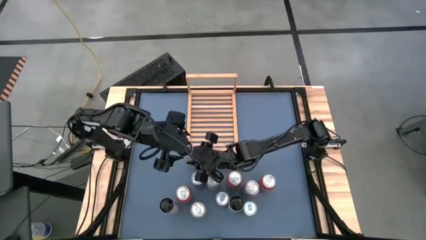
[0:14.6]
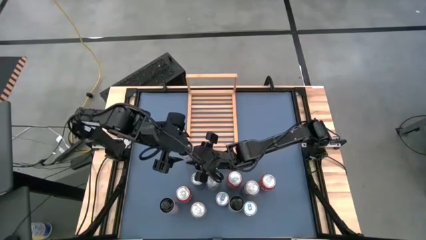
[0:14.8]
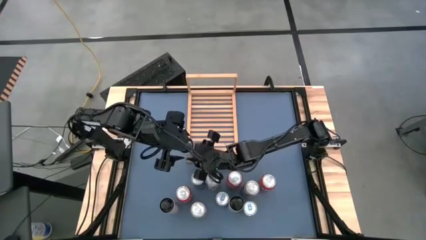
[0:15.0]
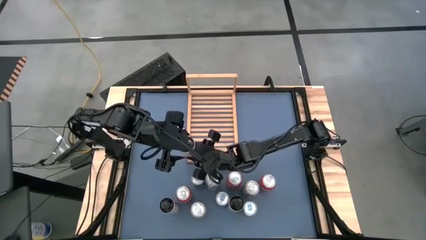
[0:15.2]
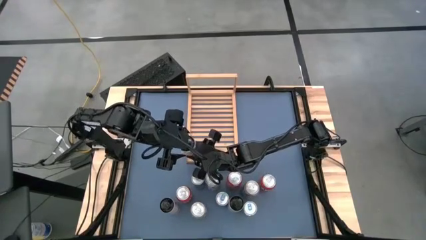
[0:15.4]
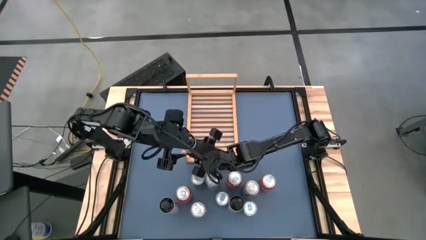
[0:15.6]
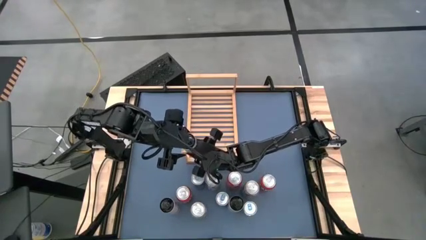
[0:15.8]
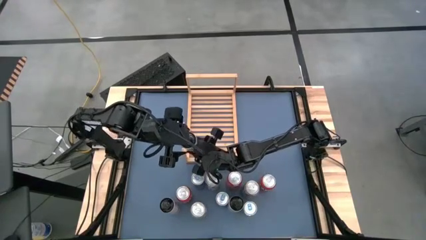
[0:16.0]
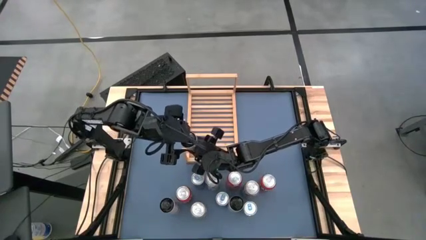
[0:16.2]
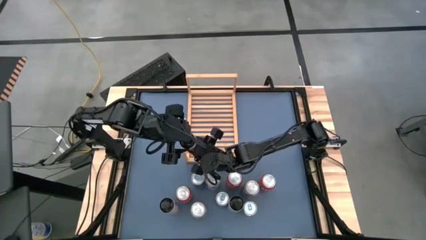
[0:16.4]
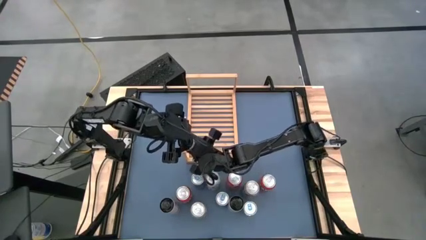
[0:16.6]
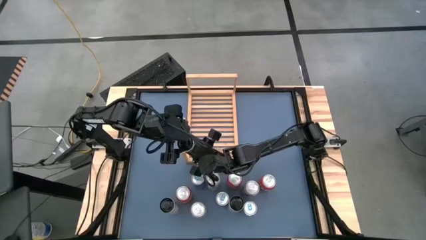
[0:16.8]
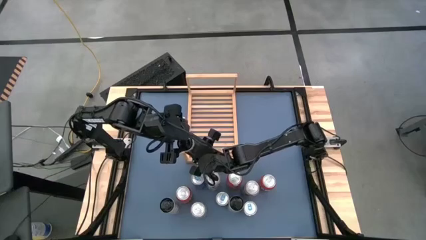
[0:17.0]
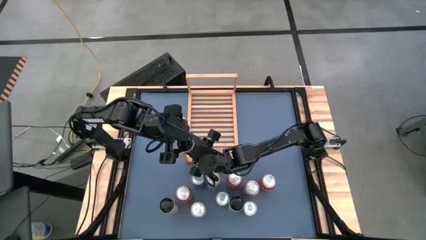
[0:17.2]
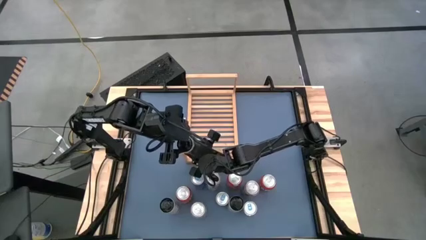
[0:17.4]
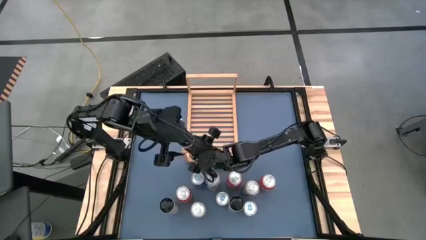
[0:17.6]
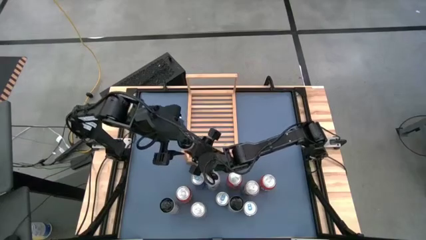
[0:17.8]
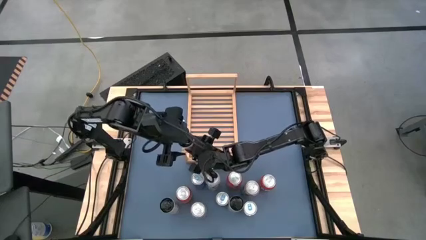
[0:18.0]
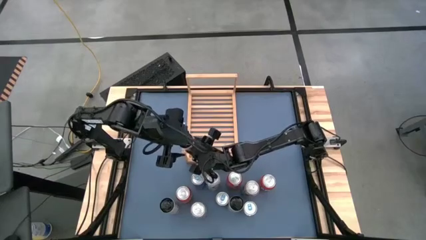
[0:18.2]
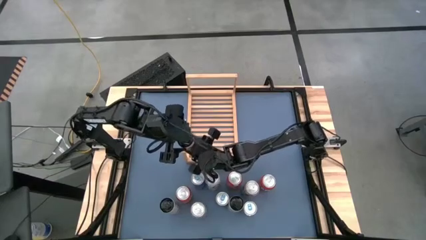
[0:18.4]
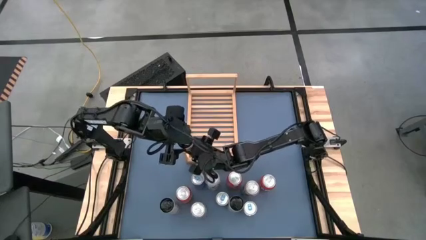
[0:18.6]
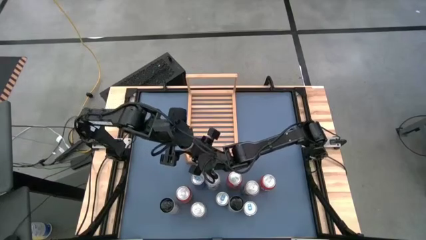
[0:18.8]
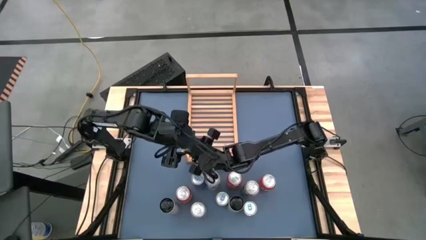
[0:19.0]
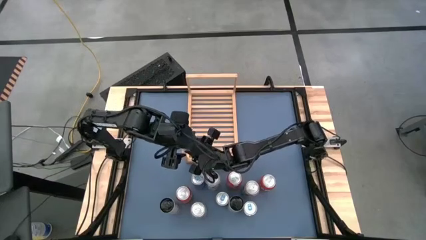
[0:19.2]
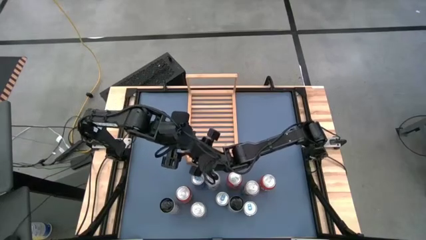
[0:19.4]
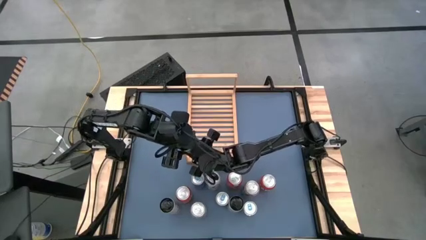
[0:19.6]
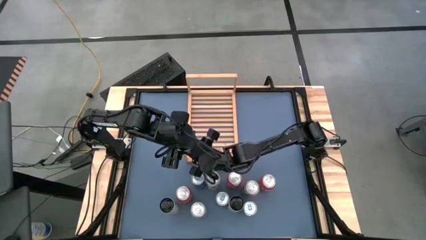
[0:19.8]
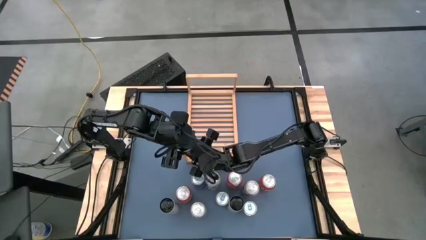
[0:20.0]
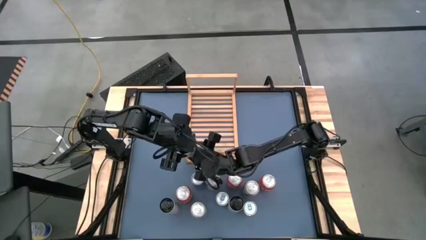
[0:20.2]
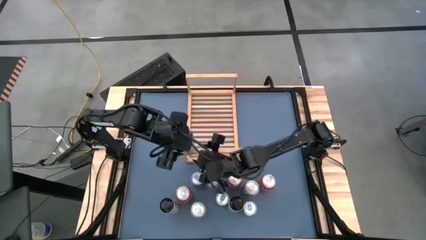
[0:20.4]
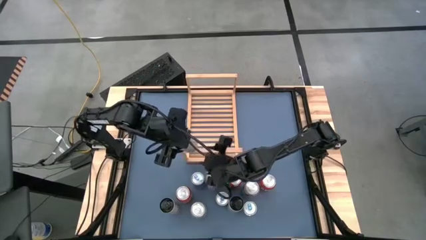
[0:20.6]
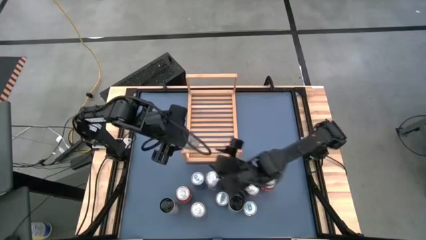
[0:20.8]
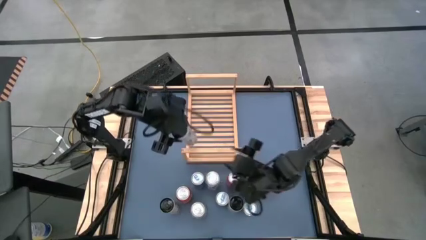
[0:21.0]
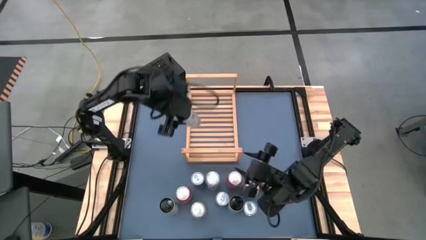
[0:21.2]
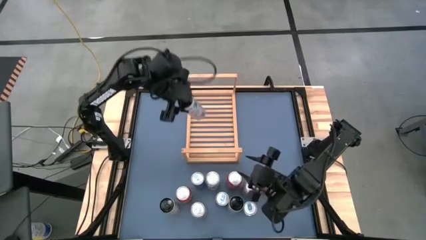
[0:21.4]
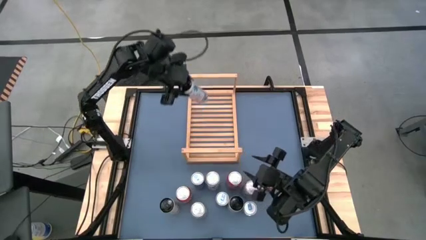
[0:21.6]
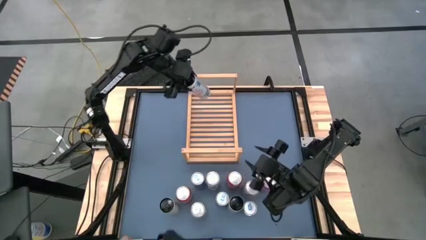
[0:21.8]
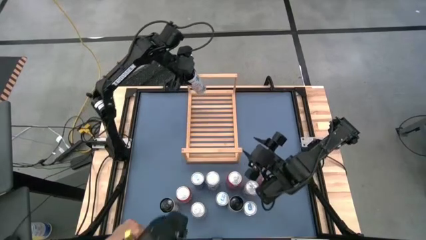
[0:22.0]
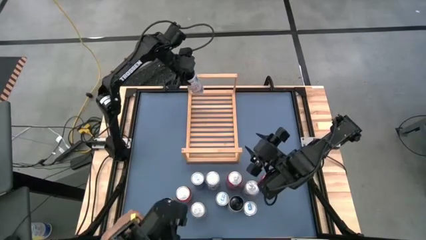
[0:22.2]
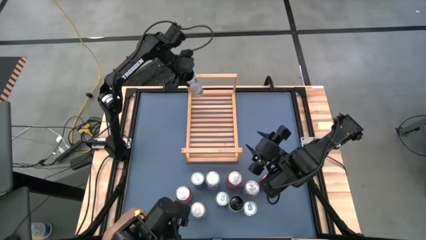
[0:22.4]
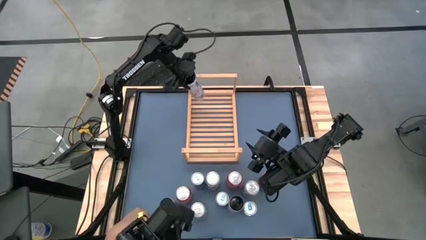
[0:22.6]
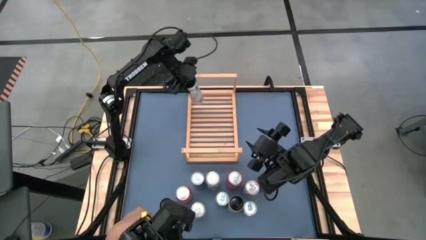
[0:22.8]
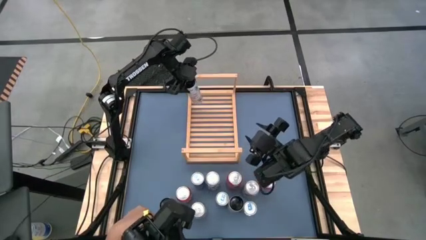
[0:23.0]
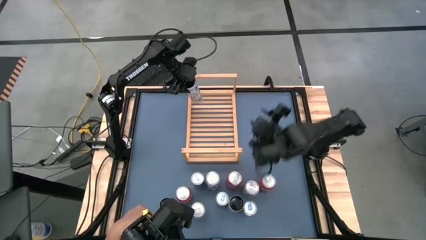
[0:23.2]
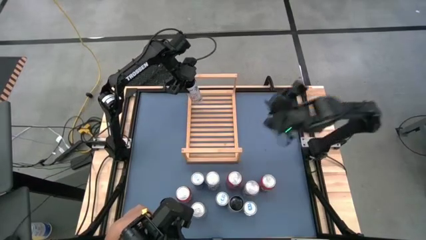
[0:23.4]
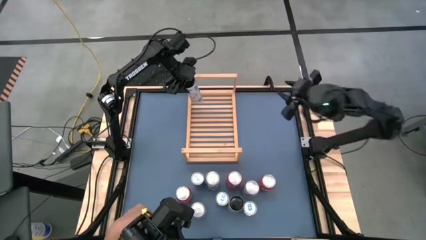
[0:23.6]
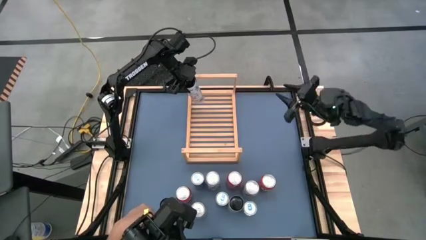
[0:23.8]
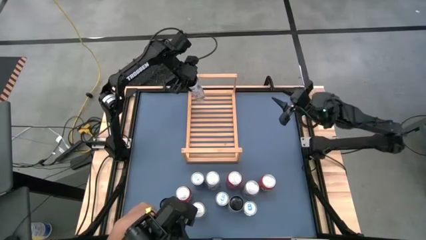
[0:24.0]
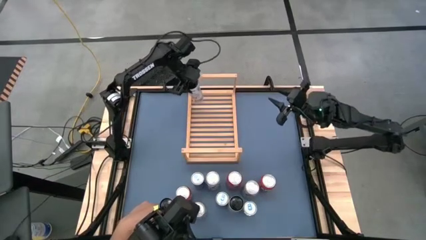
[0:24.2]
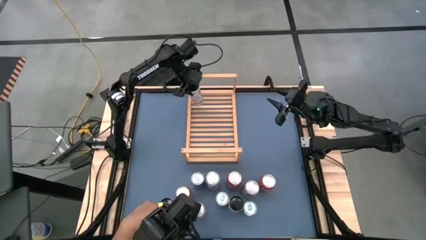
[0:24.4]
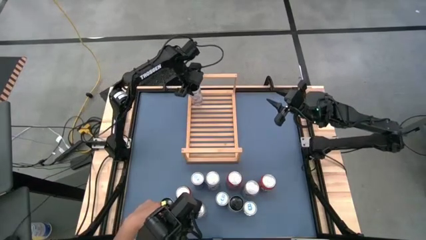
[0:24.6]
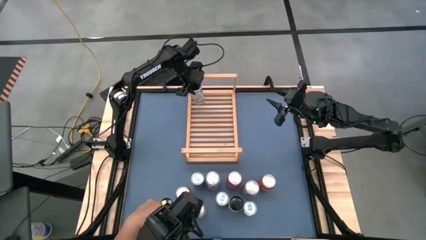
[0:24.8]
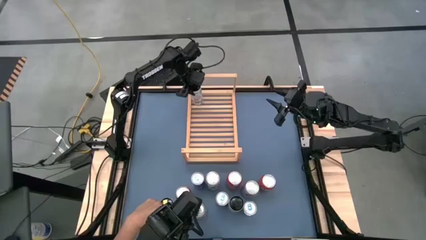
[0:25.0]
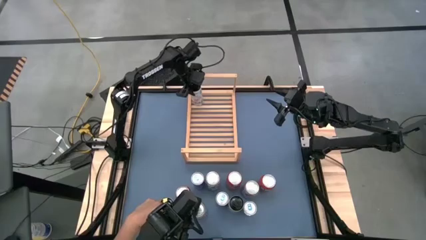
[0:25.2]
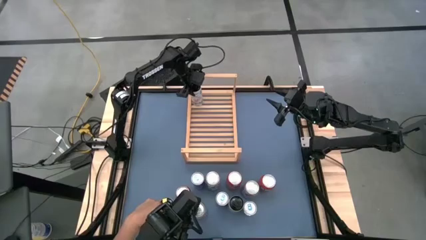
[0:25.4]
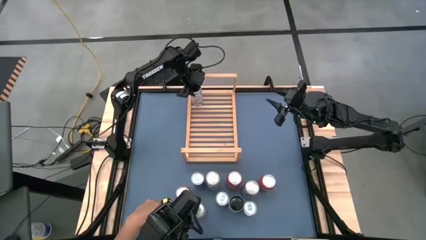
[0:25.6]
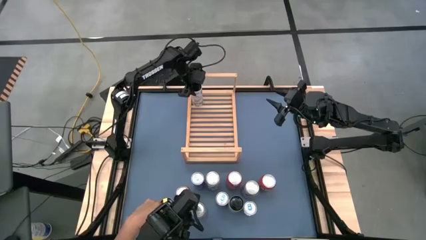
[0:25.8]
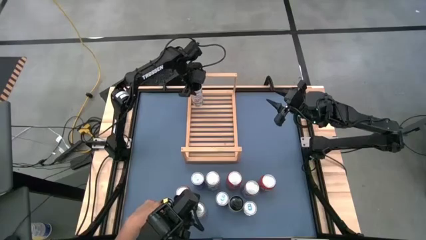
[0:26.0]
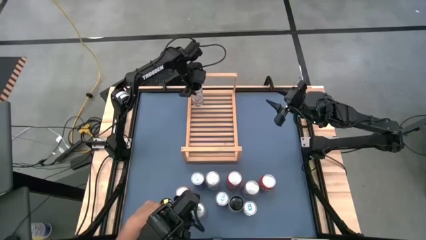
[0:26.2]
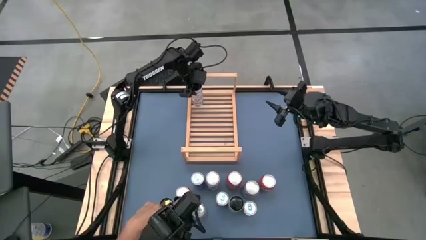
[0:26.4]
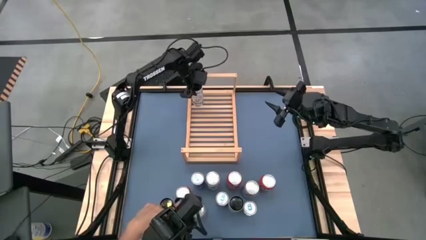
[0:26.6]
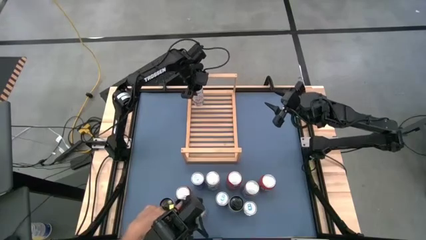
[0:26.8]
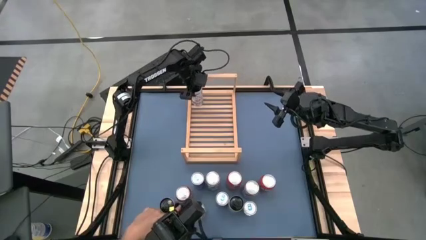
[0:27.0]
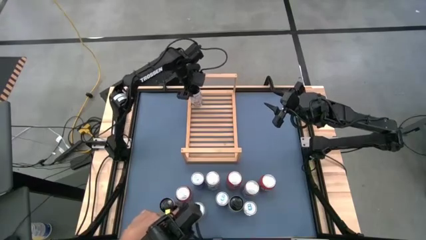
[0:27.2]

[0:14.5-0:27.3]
Task: Place canned beverage on shelf
Put the right white soda can on the shelf

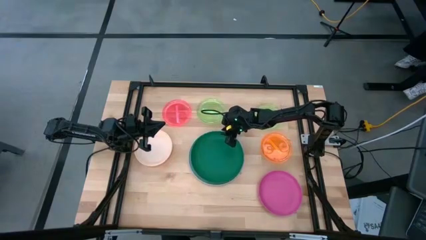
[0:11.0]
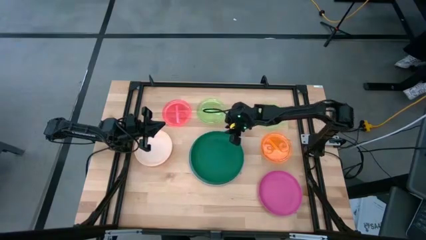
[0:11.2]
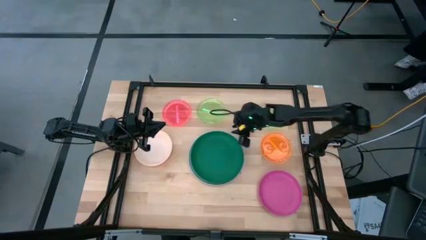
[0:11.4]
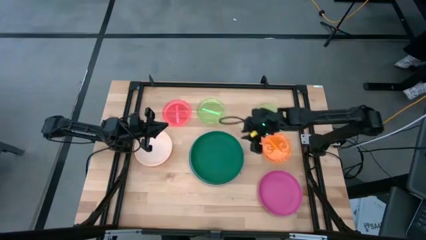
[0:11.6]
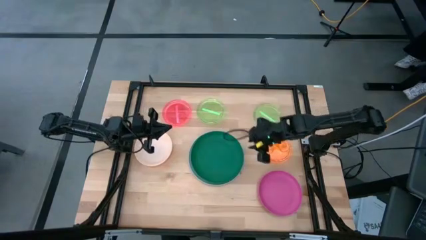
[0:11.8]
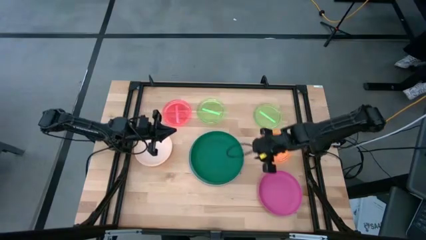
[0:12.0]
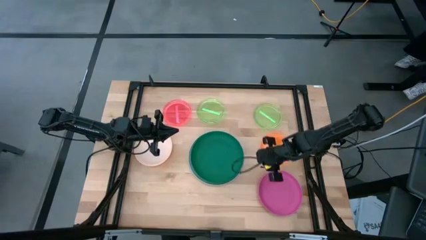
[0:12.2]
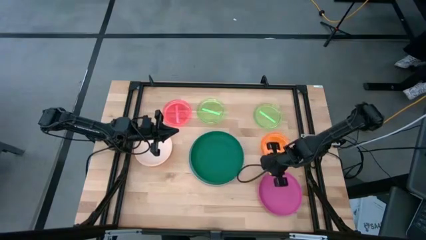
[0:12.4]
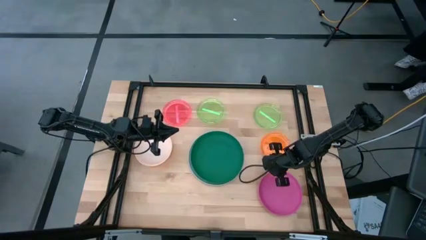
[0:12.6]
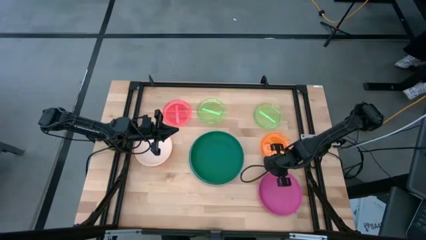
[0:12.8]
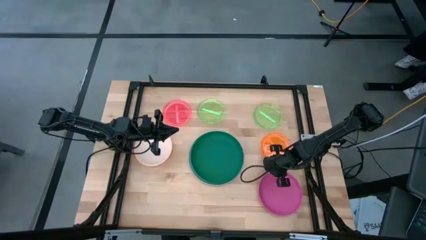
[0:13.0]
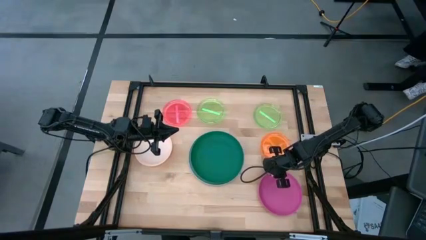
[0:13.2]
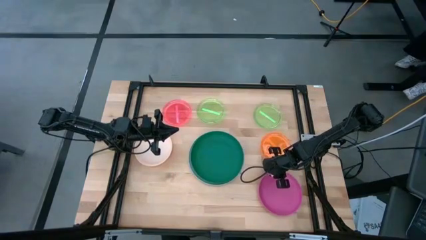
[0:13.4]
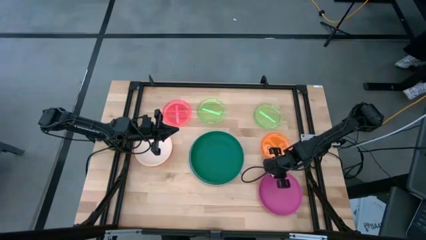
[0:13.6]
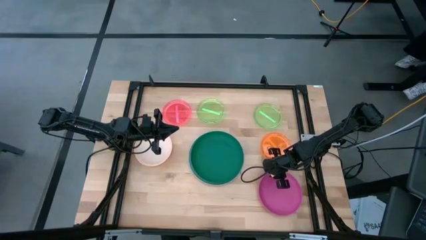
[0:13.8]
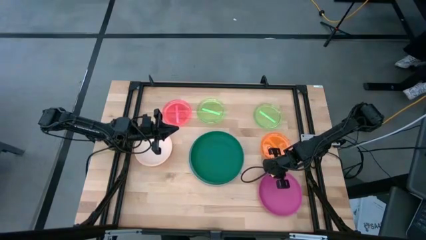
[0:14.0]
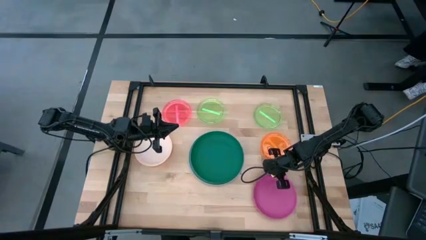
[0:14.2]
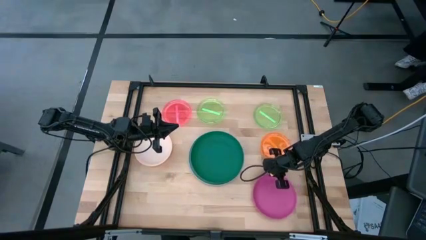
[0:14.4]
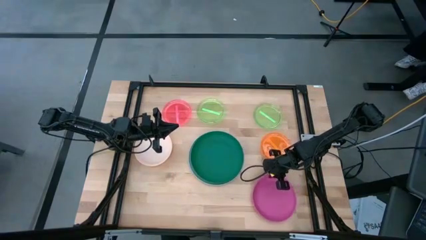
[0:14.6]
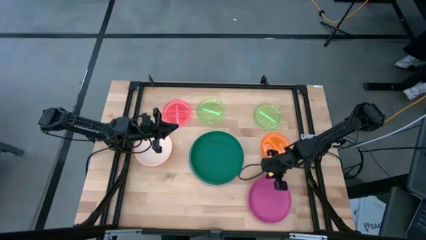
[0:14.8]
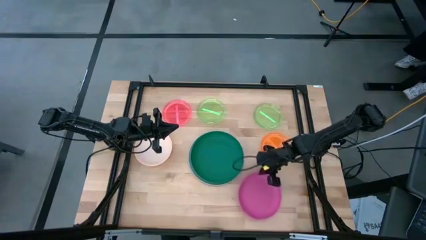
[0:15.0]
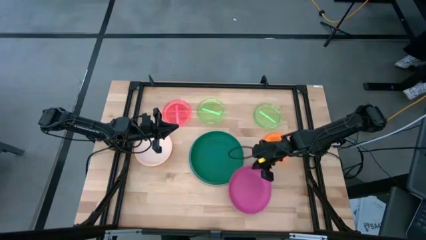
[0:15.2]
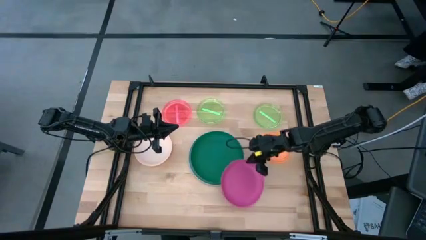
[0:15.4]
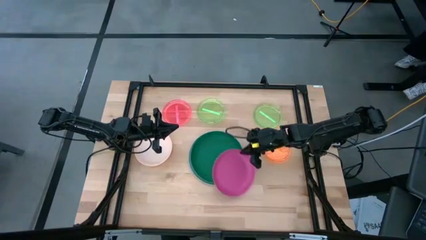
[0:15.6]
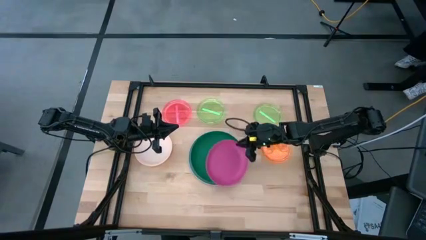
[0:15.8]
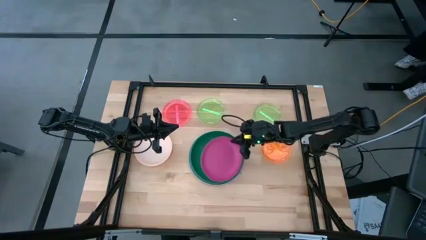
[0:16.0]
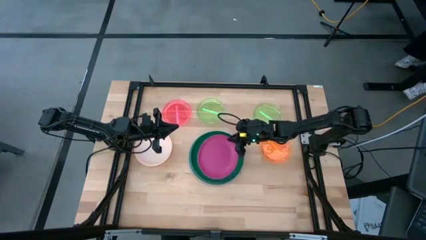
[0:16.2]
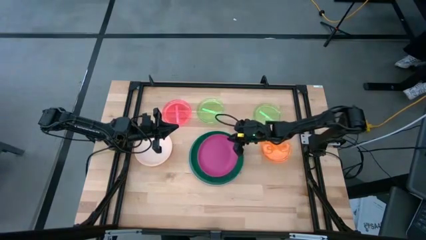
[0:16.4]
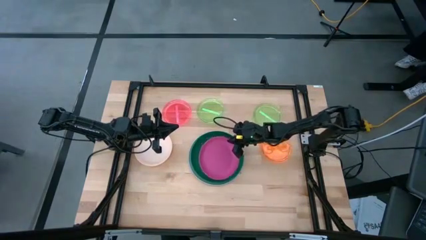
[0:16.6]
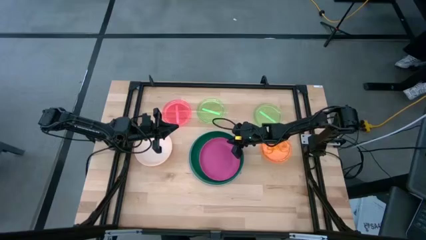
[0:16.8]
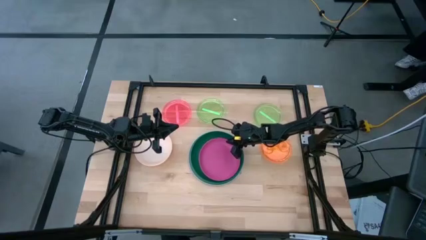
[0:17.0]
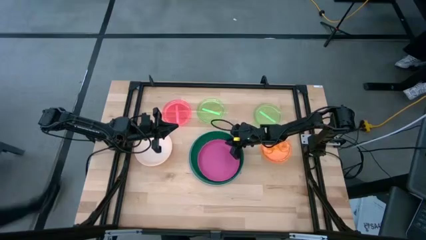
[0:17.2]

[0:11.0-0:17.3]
Task: Stack plastic plates
Stack the pink plate on top of the green plate
